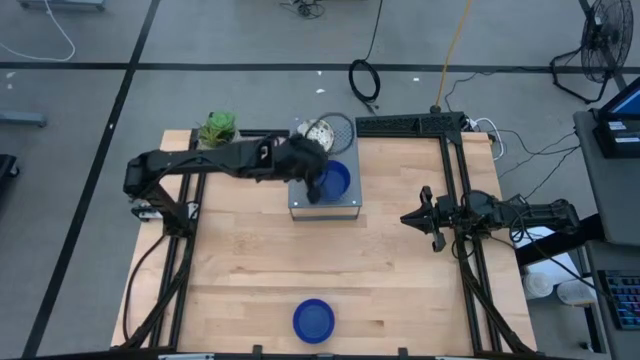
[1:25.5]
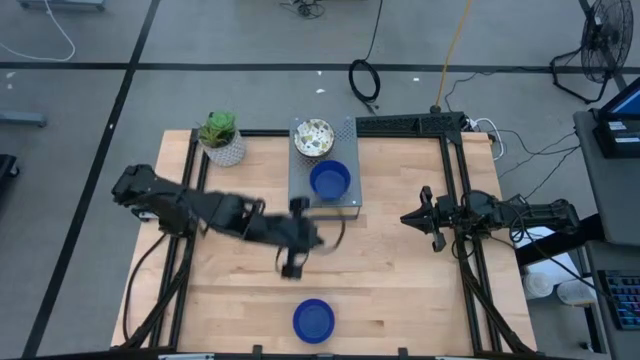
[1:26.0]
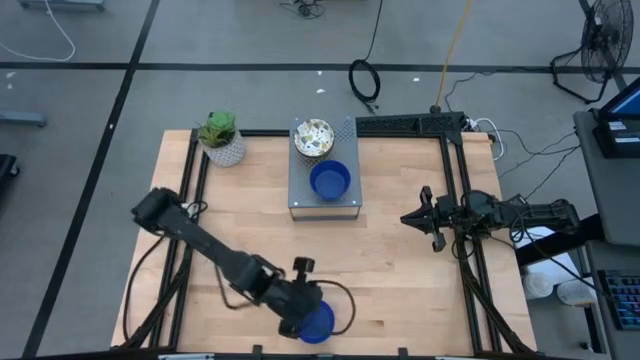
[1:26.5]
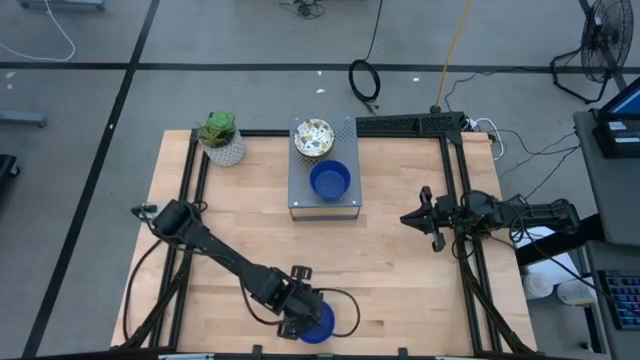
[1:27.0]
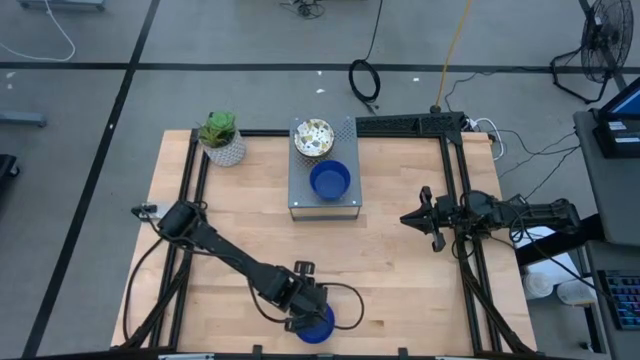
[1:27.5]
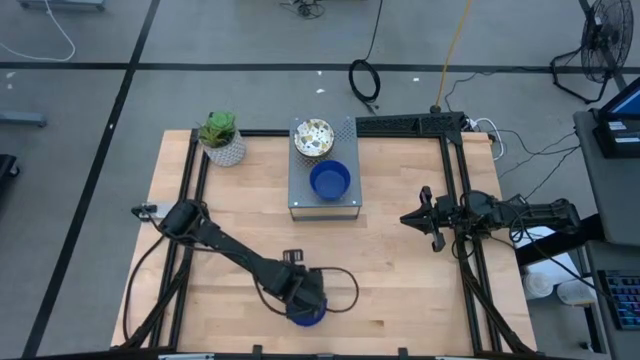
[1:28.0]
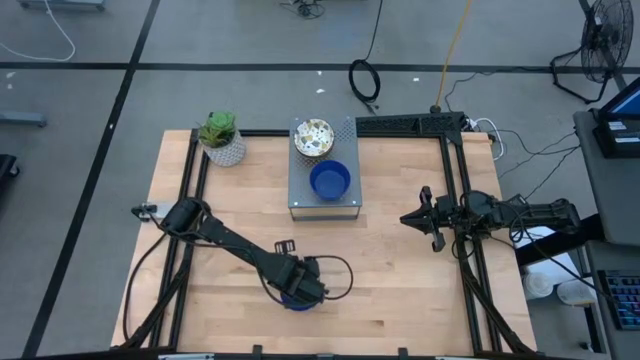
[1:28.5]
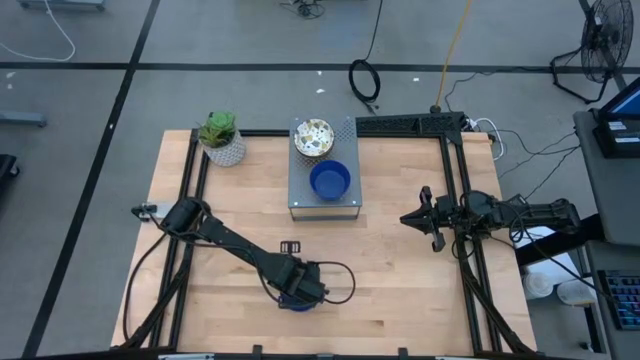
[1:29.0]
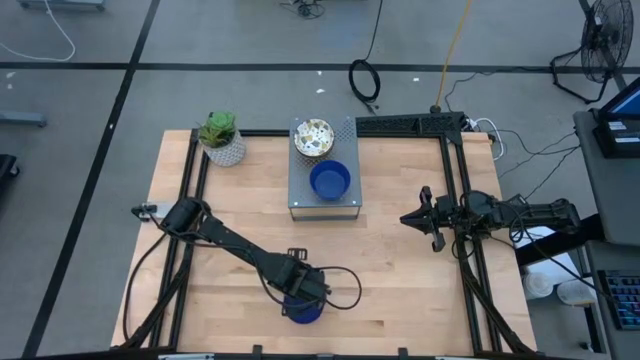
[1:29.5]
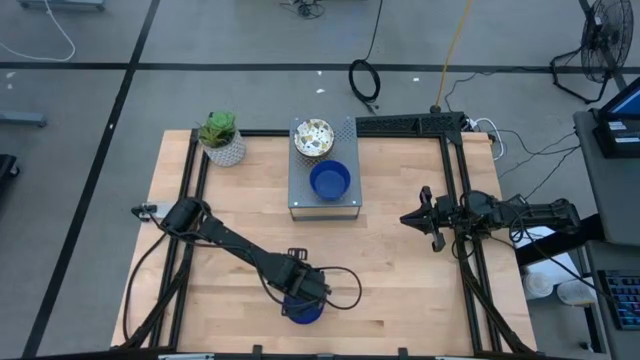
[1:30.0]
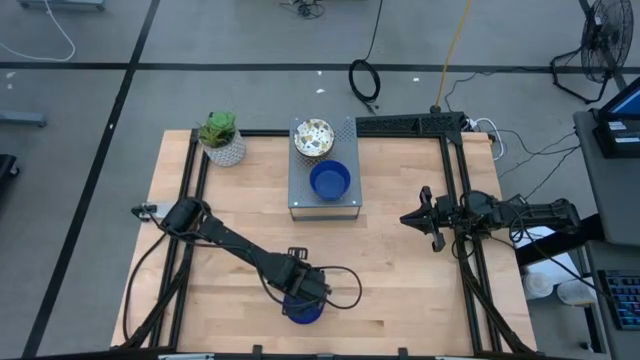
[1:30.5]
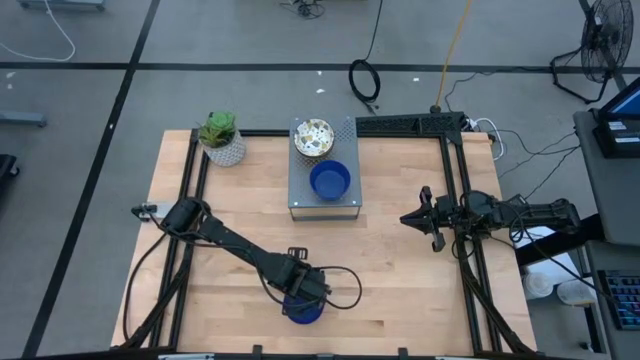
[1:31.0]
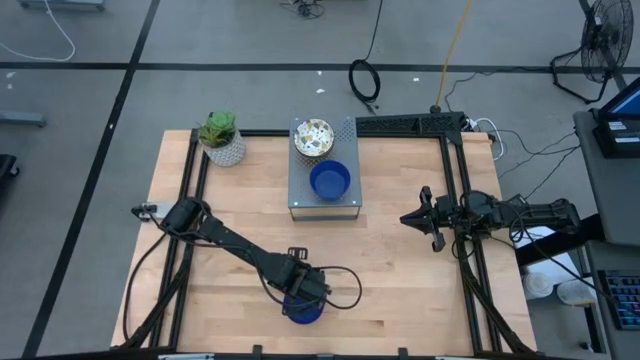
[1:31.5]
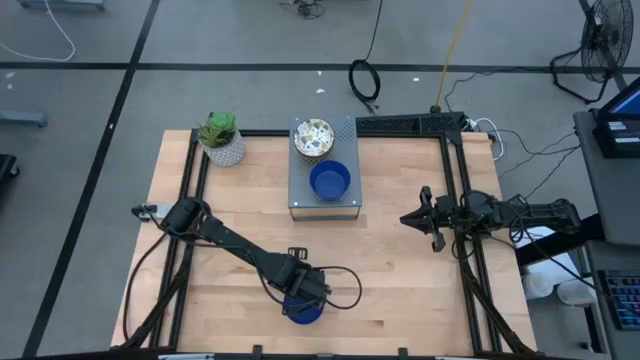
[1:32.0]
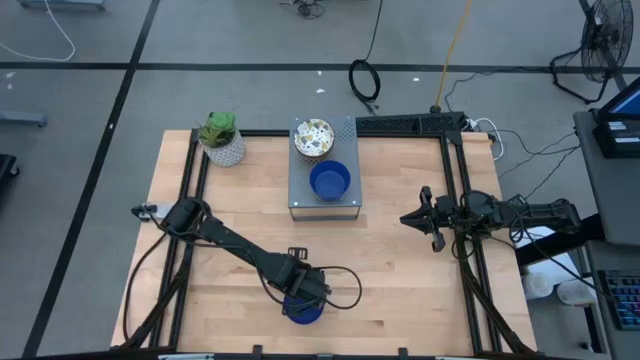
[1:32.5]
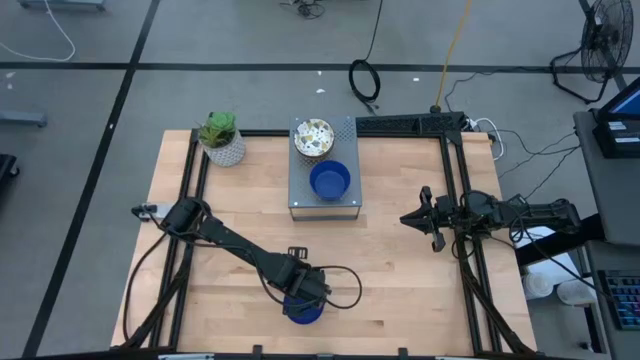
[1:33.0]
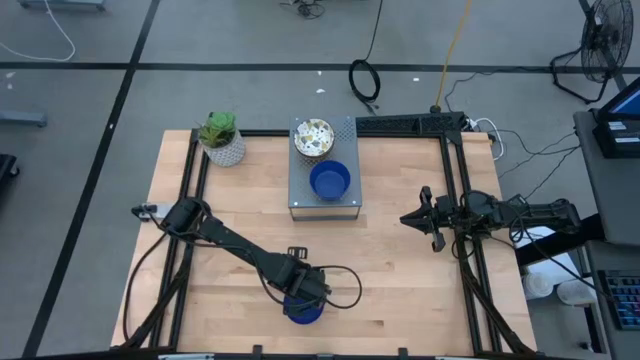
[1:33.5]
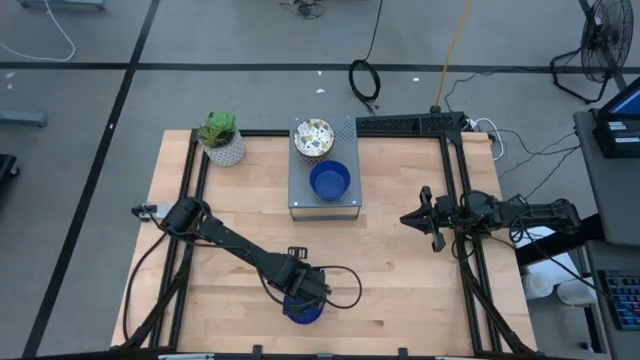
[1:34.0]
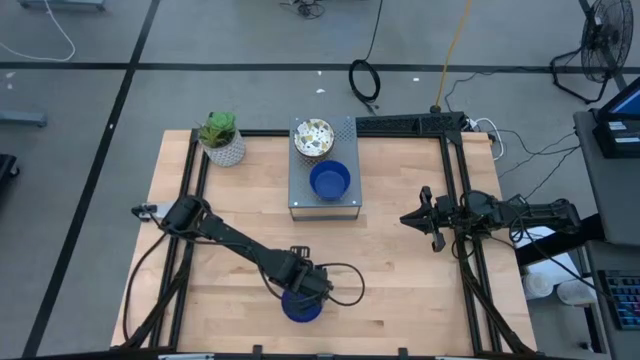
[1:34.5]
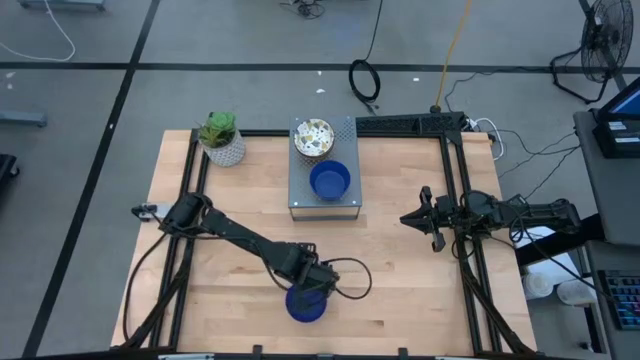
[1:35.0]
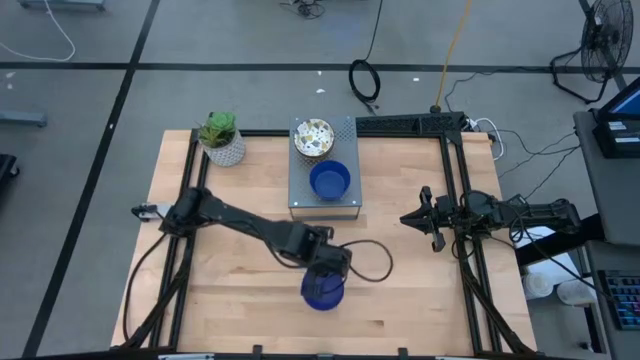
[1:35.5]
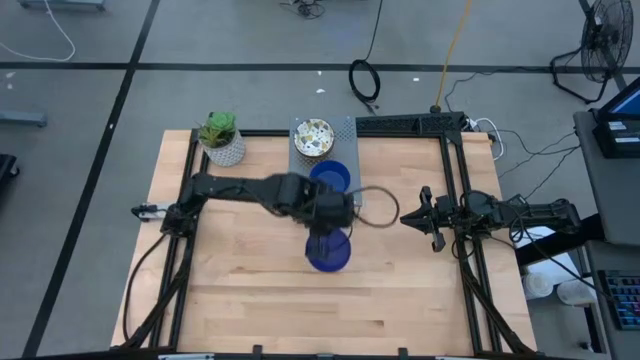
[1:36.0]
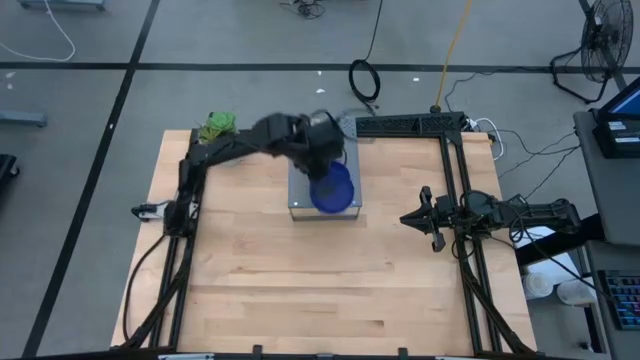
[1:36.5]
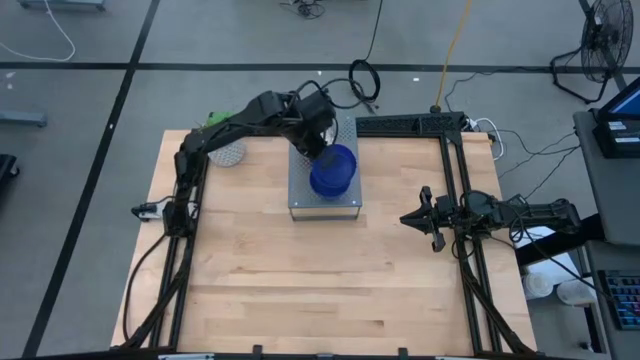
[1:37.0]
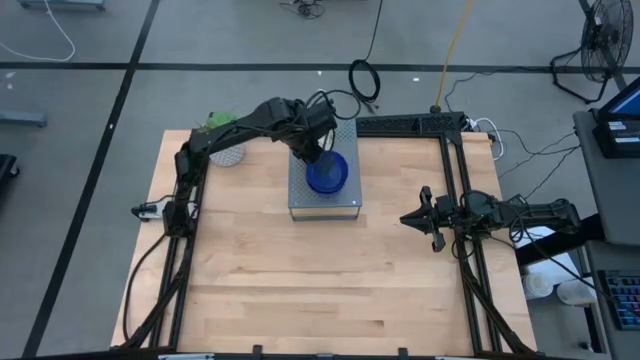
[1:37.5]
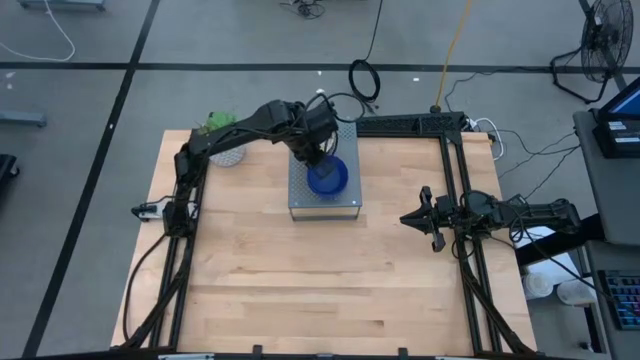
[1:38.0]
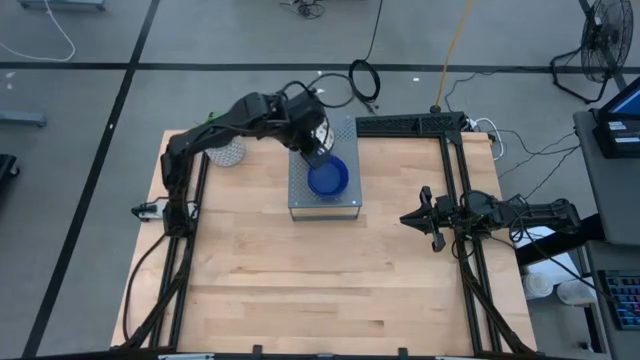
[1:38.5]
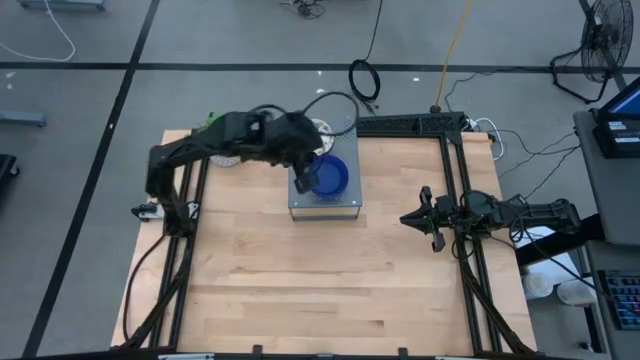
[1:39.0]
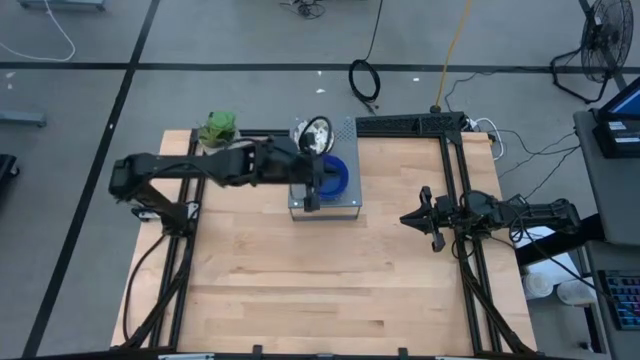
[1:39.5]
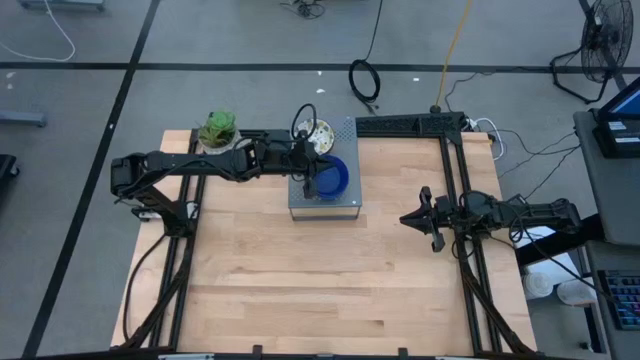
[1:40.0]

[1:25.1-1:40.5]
Task: Pick & Place Mini bowls
Stack the blue bowl on the blue bowl on the shelf

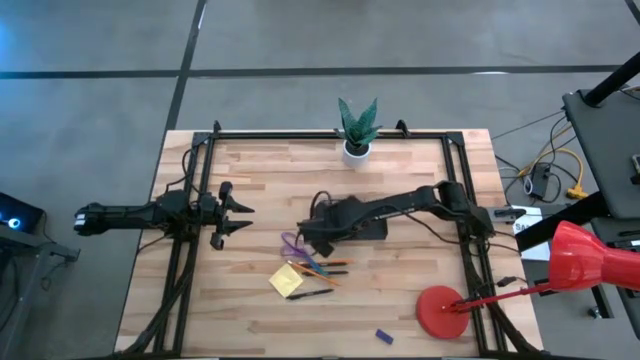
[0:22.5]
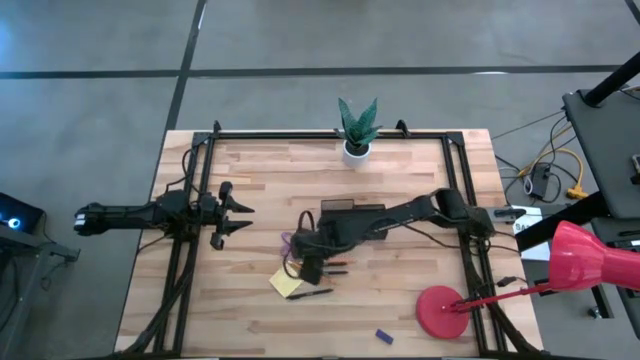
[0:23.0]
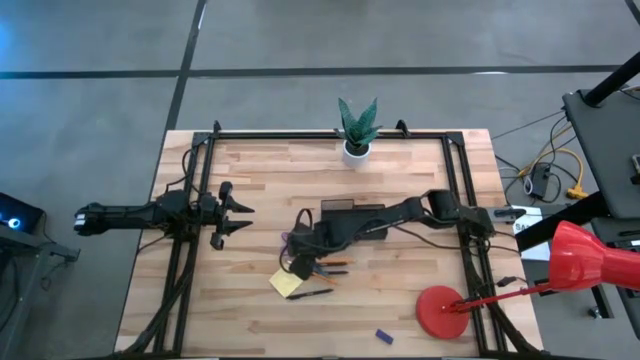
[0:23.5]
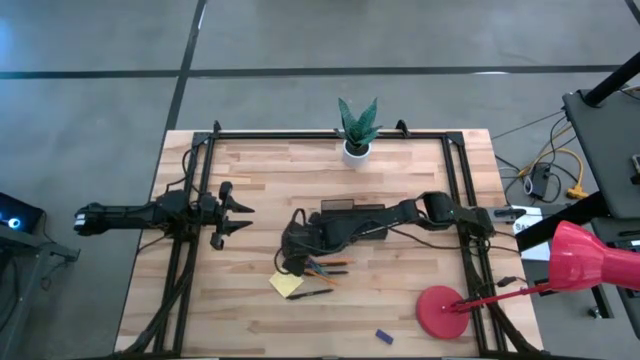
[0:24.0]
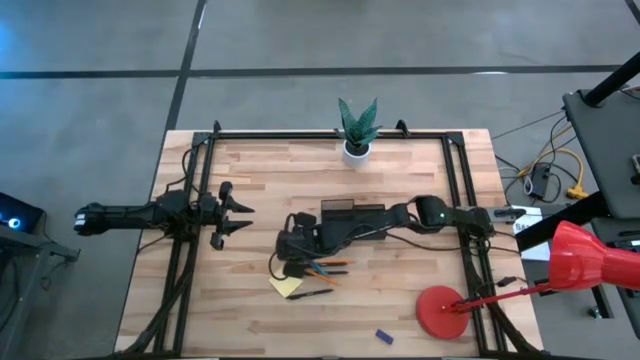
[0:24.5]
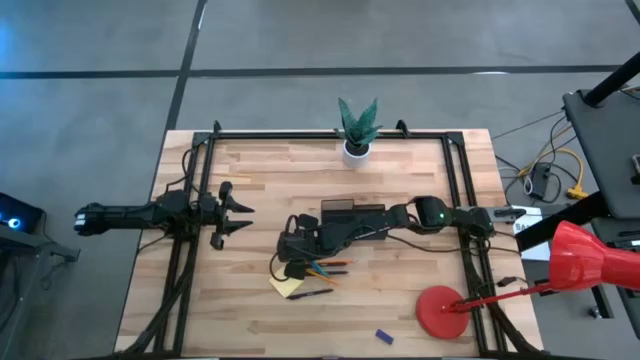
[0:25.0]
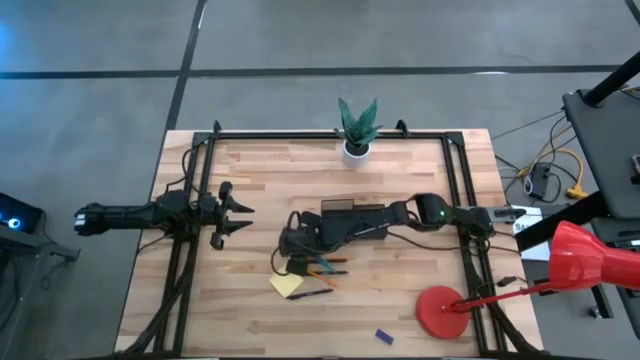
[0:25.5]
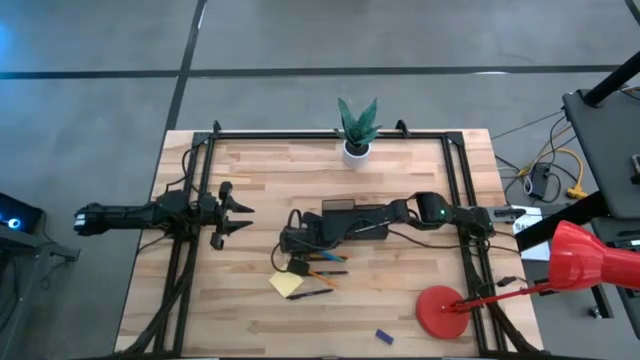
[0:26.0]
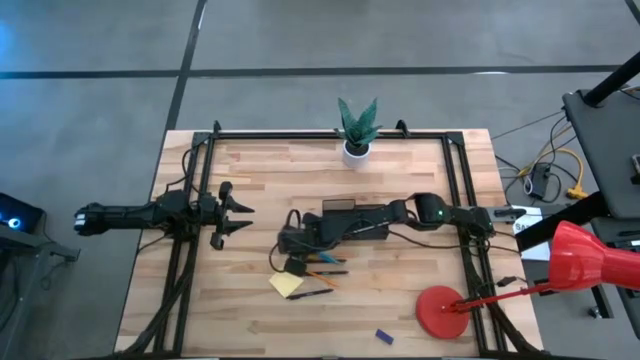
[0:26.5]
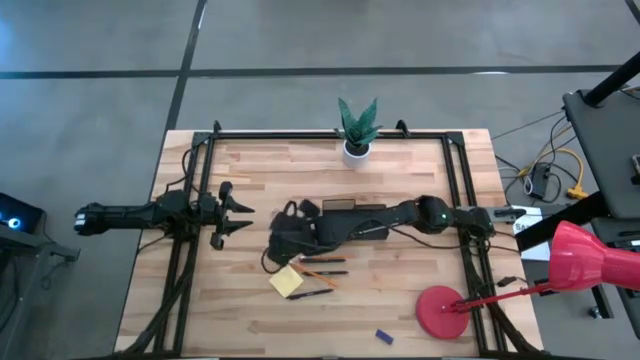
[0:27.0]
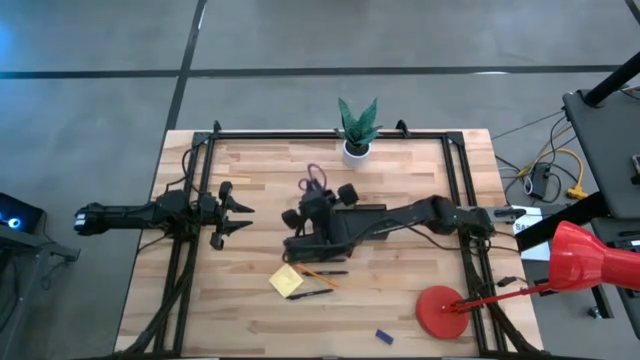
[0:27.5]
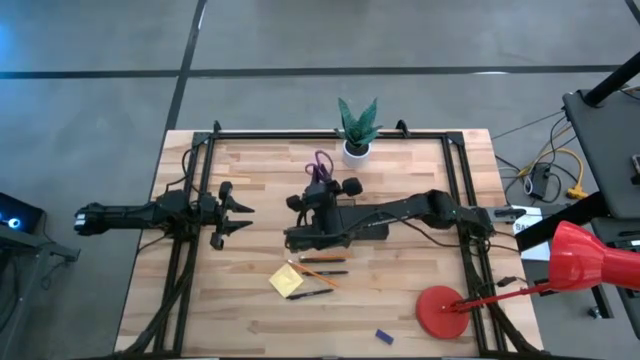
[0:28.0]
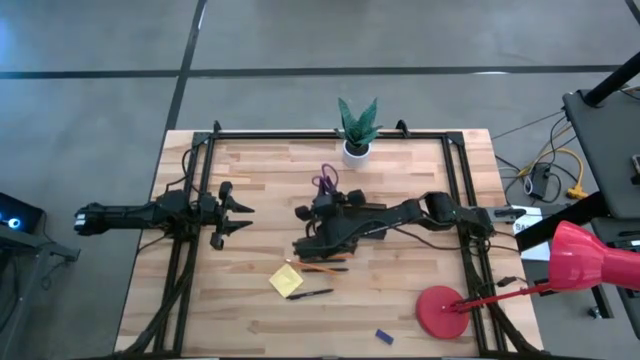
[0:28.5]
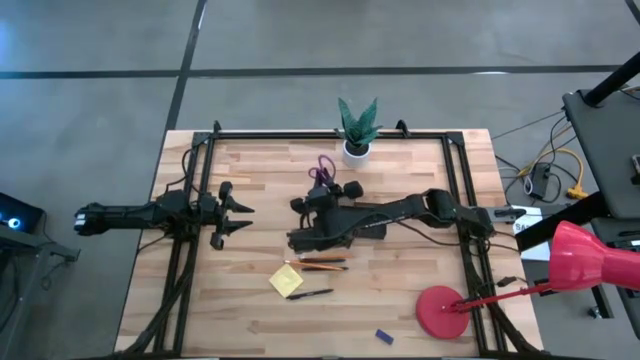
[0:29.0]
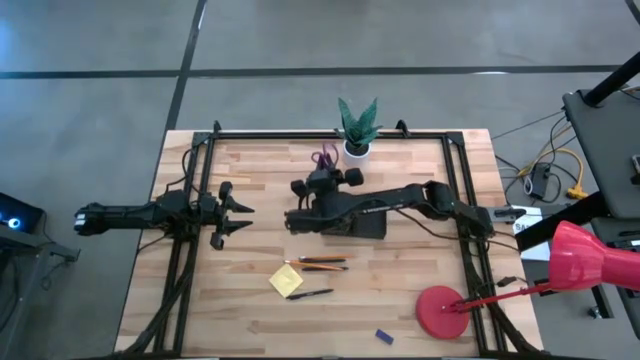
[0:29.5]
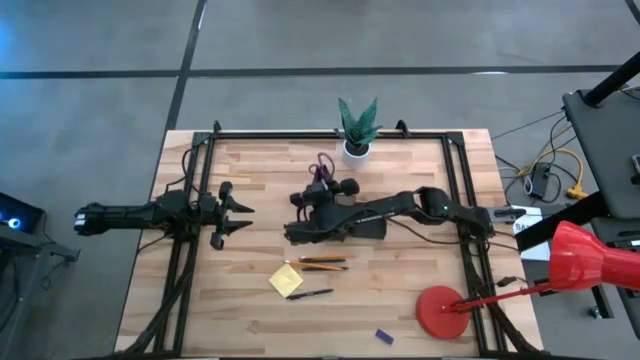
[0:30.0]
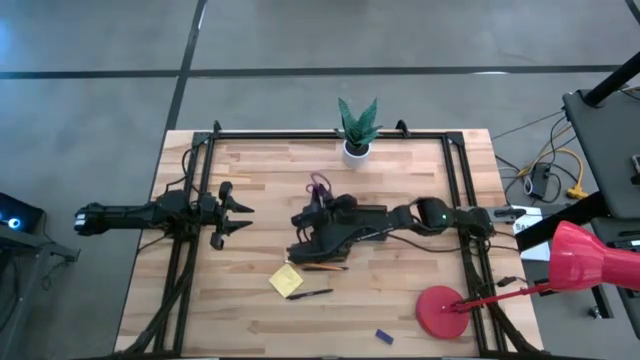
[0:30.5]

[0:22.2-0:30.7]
Task: Pick and place office supplies into organizer
Put the violet scissors into the black organizer
